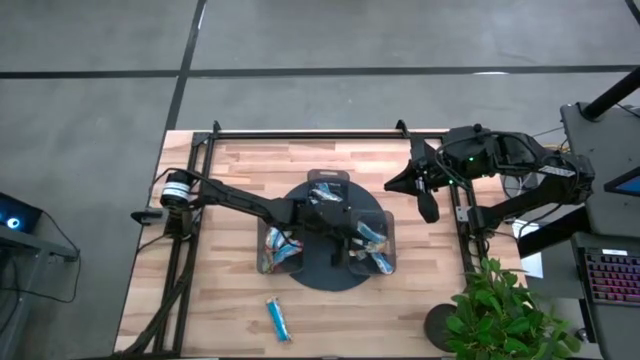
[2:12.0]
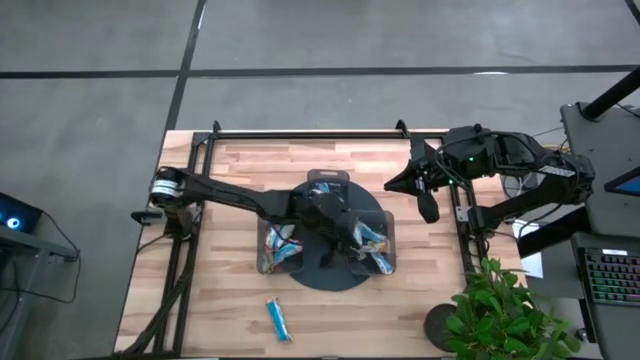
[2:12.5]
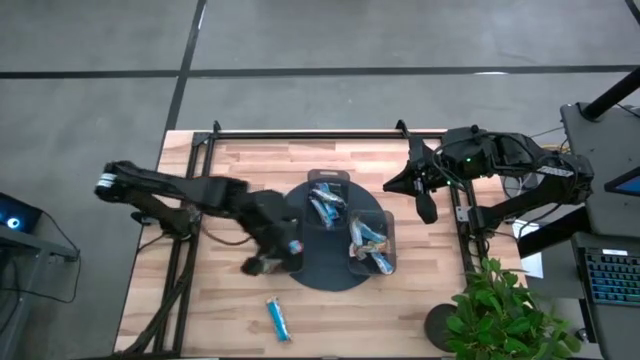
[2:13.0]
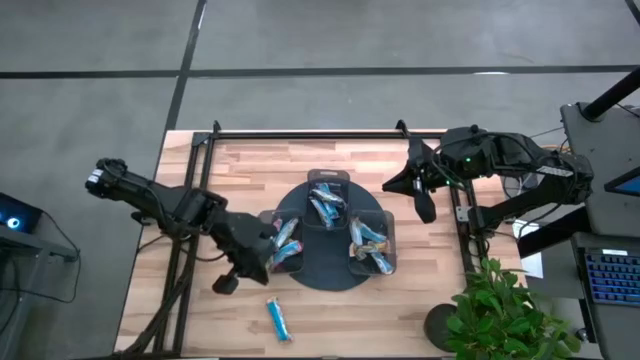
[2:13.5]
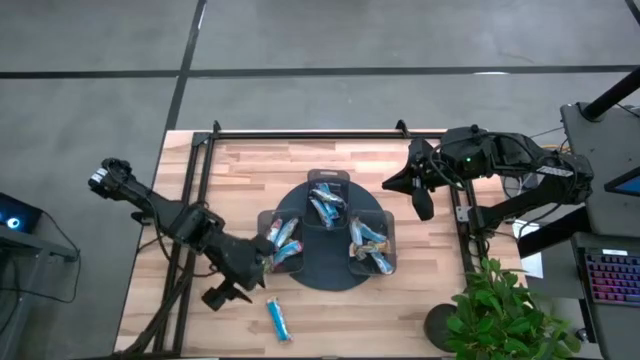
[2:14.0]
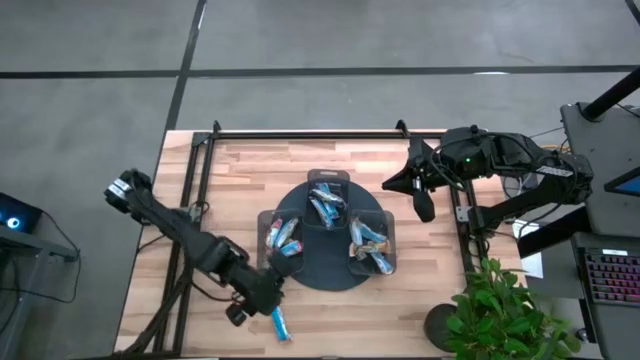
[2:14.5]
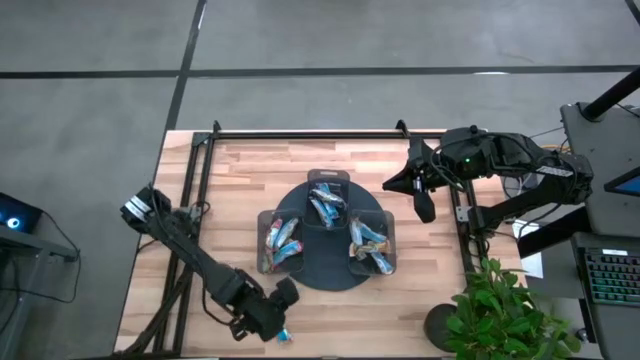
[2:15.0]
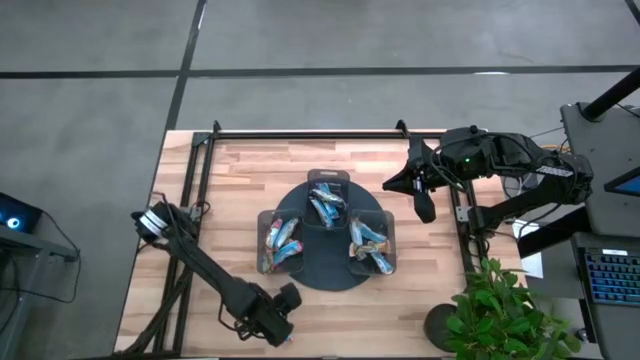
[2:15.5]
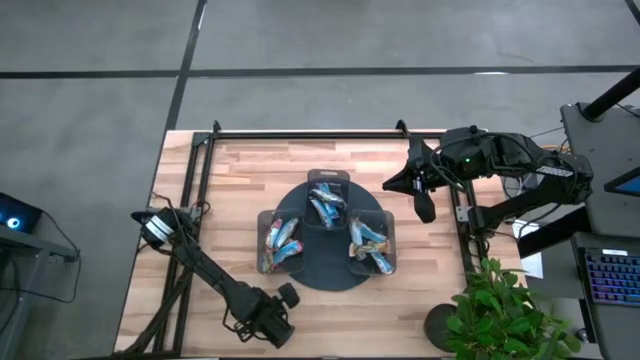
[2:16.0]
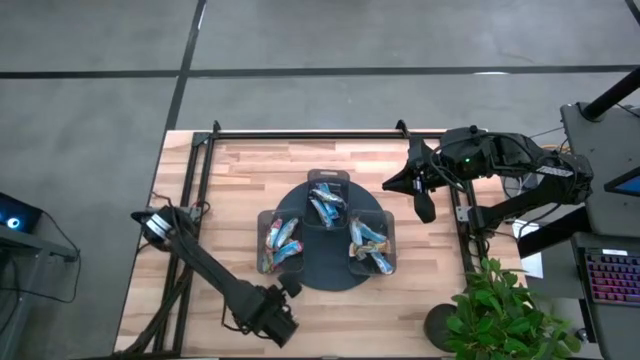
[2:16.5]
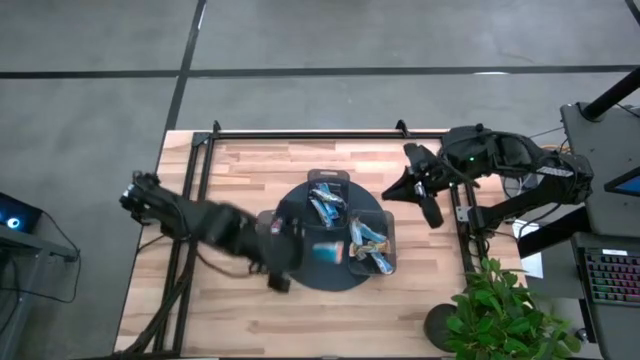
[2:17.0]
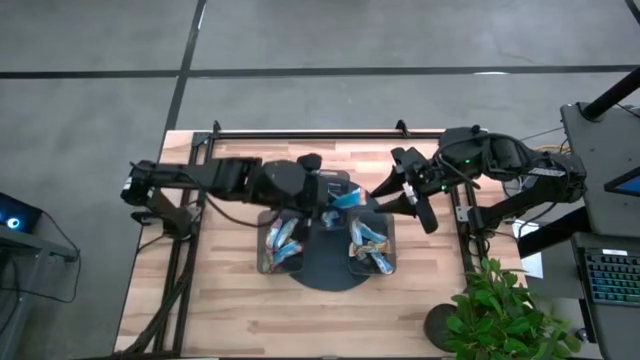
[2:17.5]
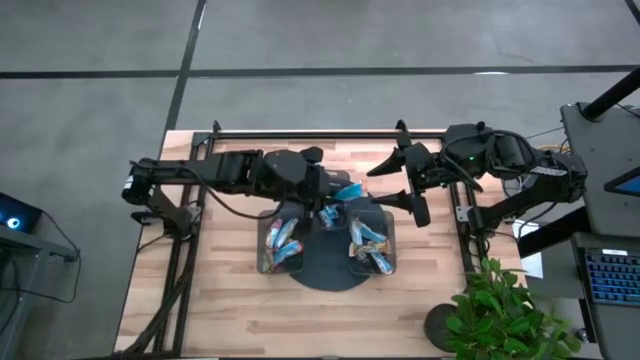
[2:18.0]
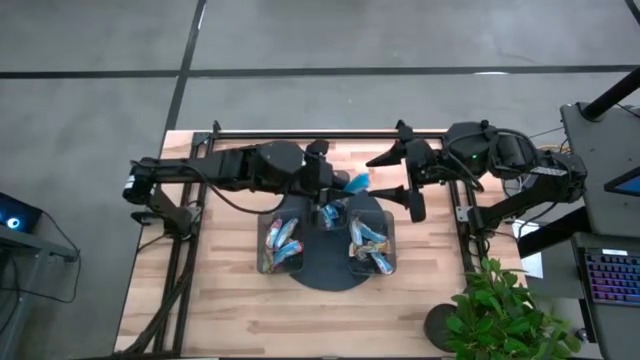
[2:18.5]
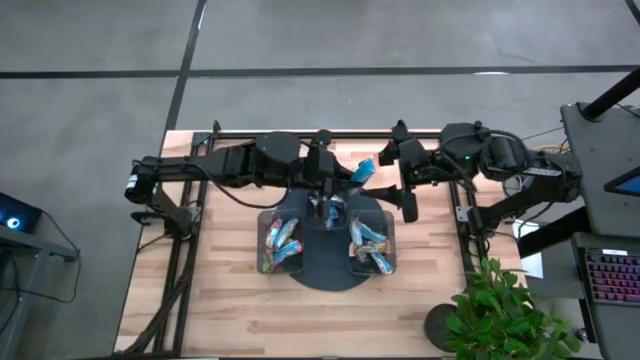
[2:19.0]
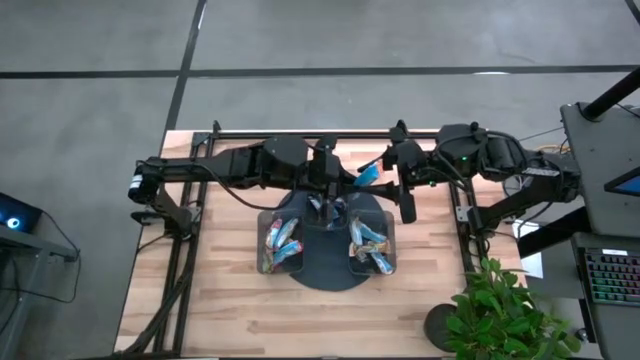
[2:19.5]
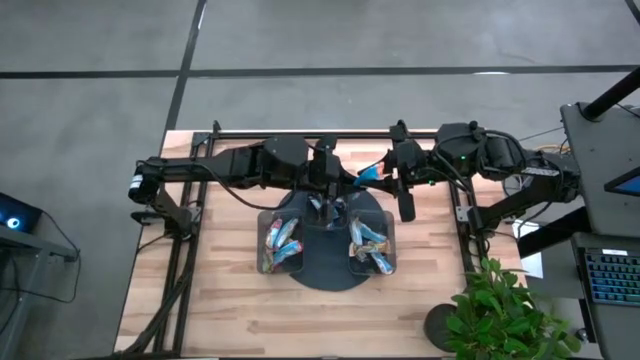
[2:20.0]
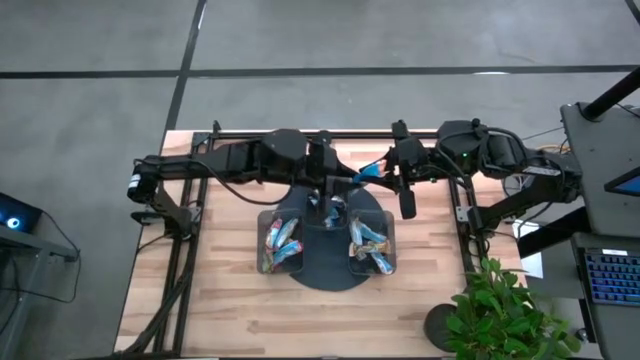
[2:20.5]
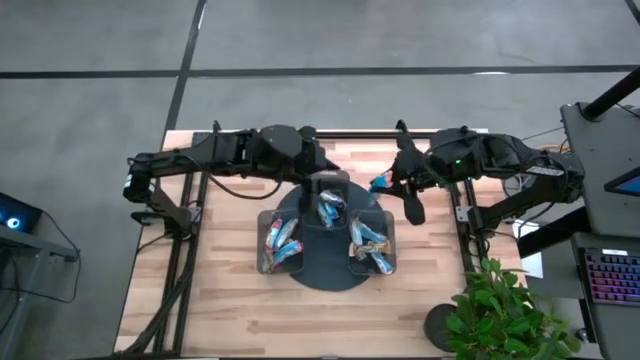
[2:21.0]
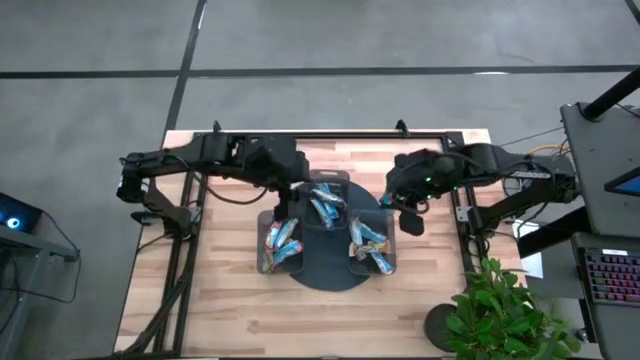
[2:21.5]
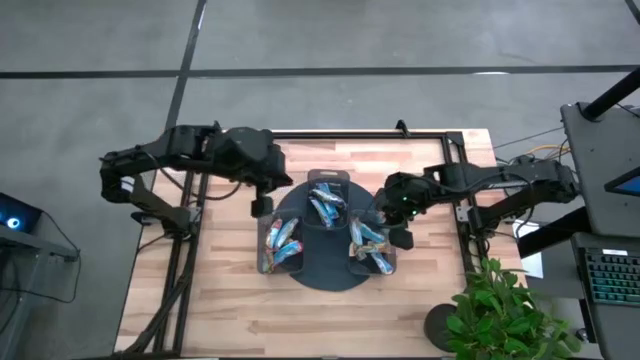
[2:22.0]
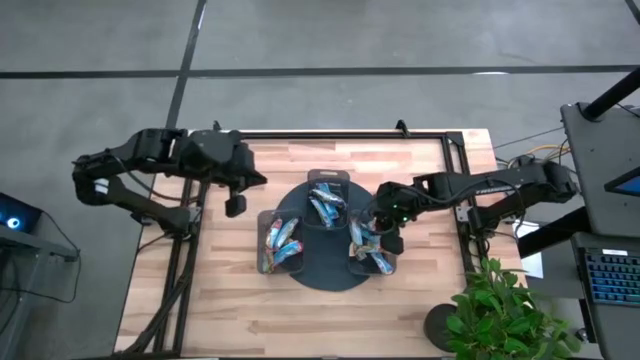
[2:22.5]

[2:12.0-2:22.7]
Task: Pick and place Granola Bars by type
Put the yellow granola bar into the bottom right black bin

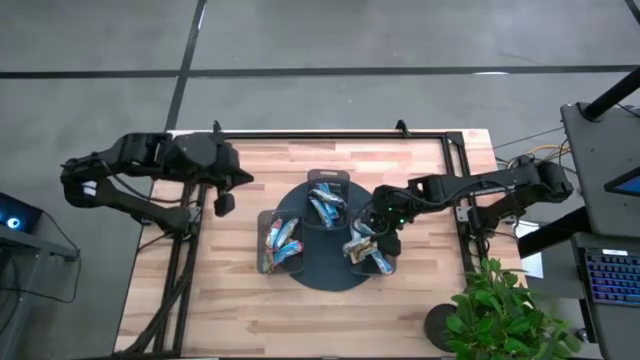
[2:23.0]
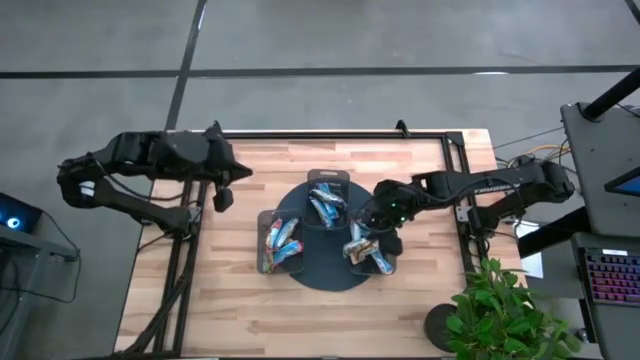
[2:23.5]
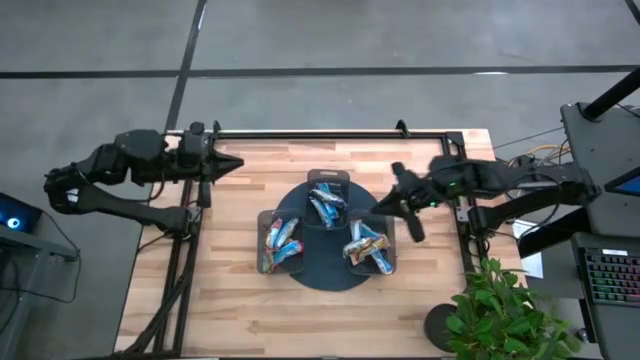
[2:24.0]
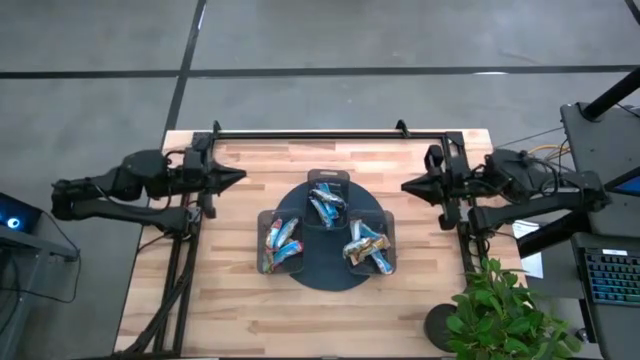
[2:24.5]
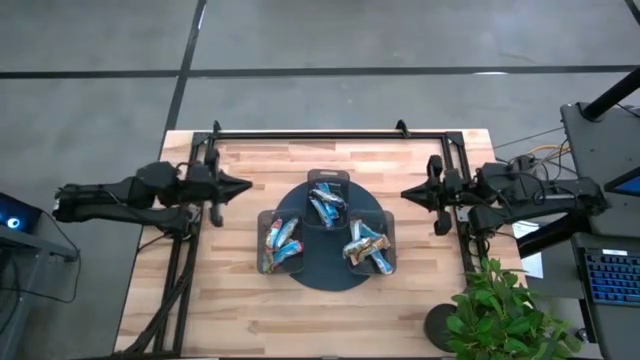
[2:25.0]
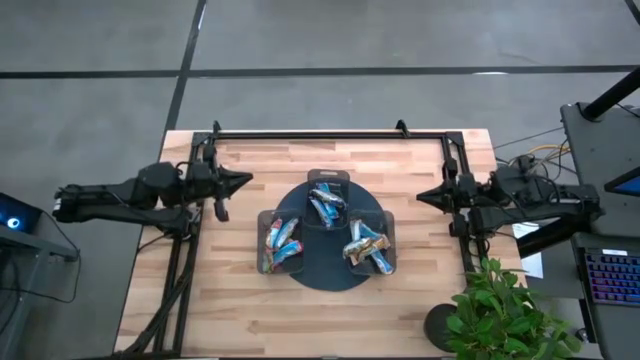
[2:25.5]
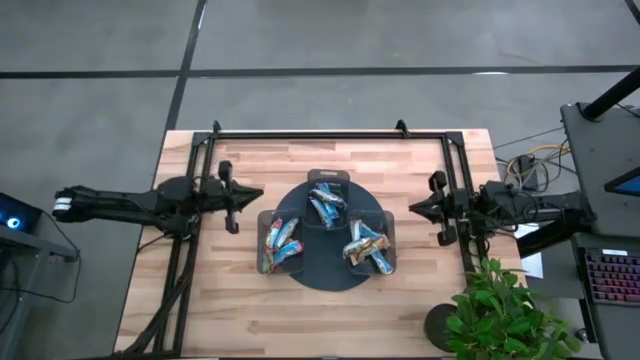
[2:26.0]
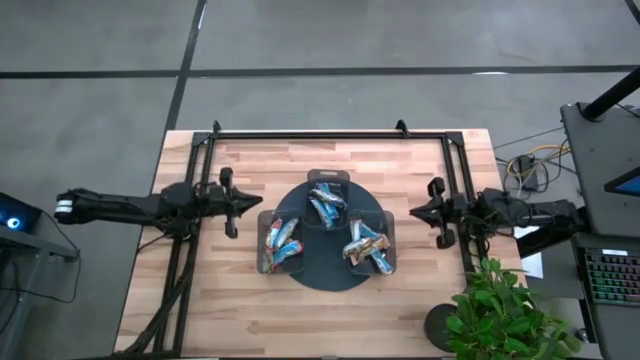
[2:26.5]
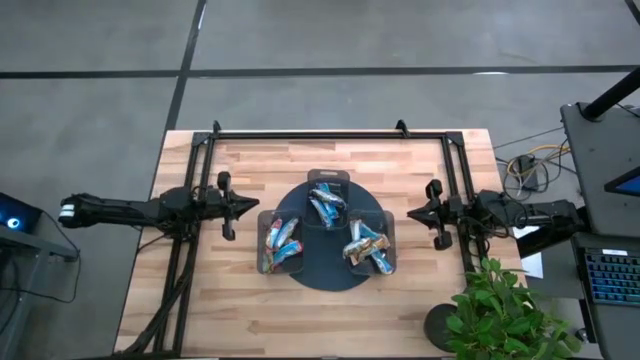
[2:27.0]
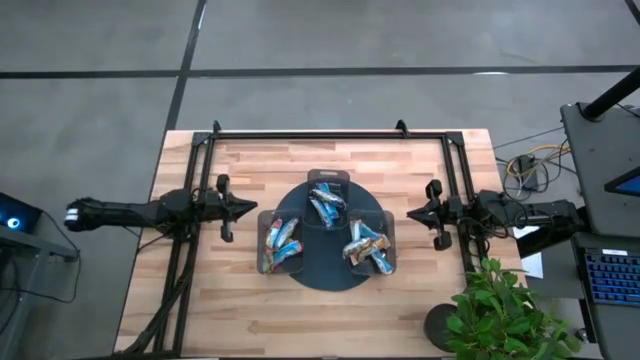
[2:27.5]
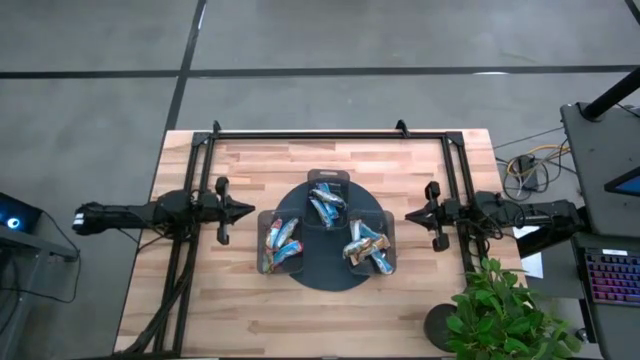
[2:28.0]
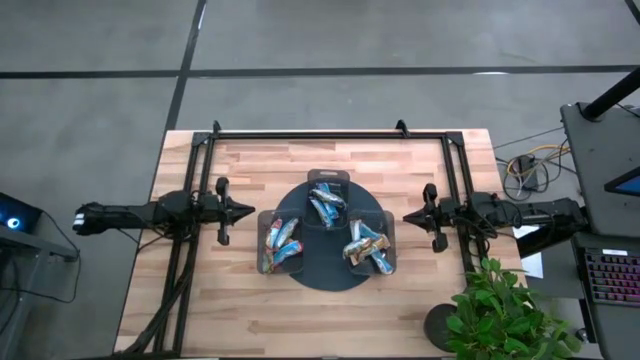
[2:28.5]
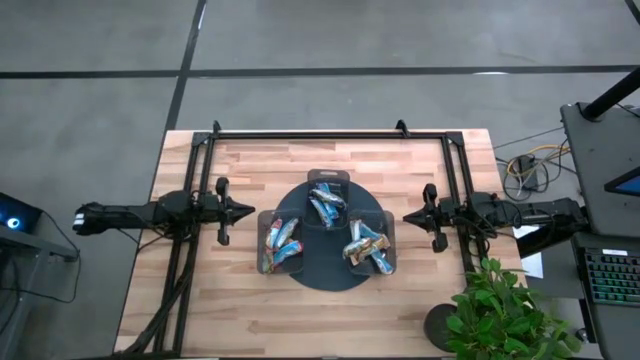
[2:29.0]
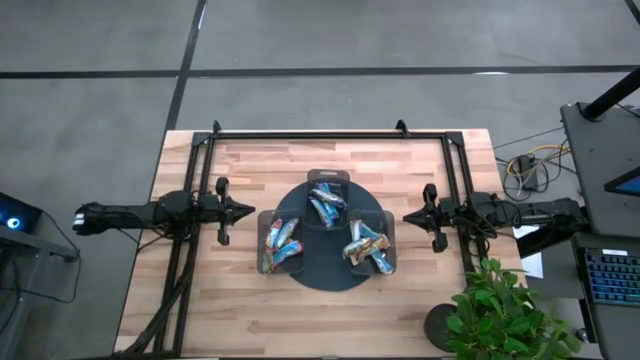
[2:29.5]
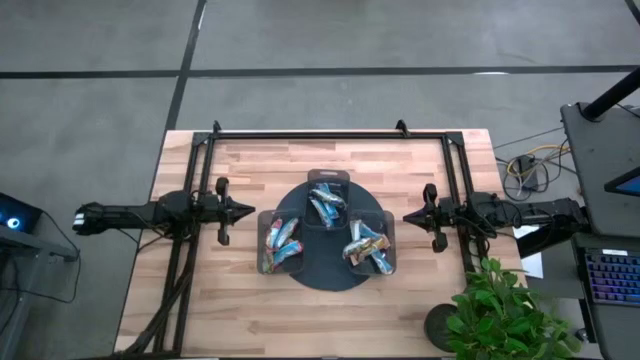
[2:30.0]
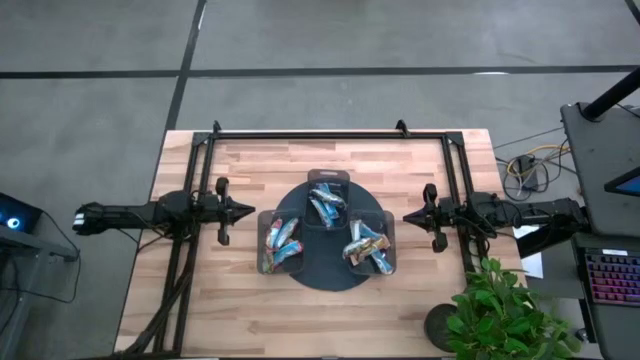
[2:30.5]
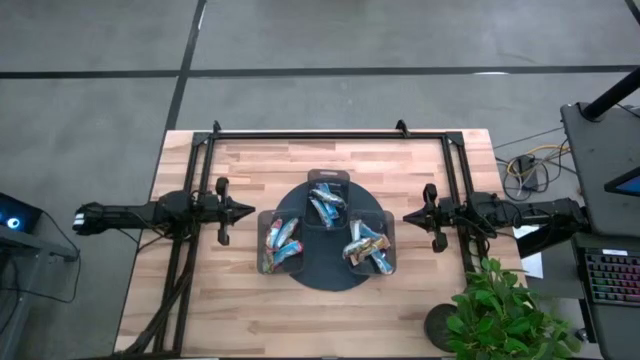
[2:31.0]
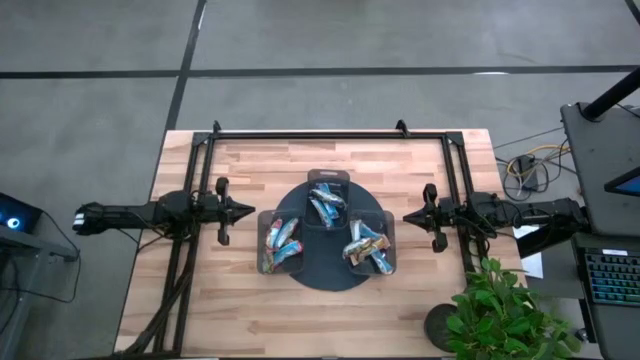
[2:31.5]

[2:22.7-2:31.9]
Return to Home Position

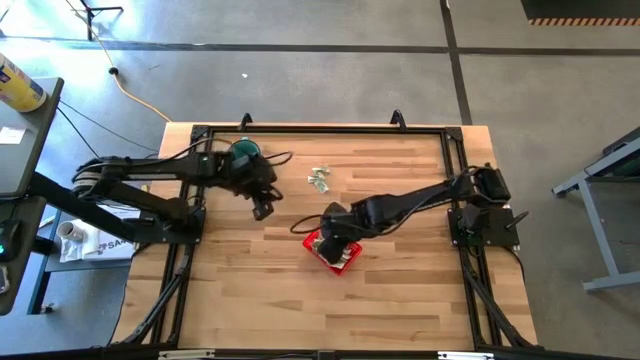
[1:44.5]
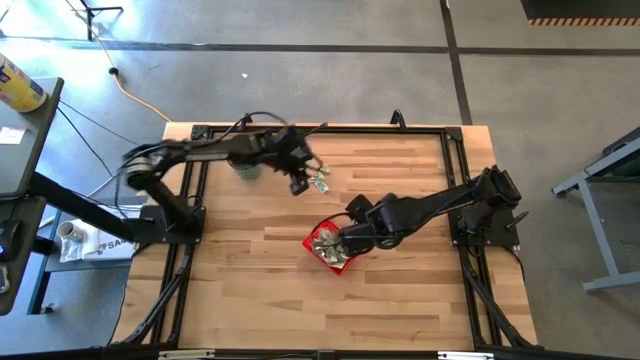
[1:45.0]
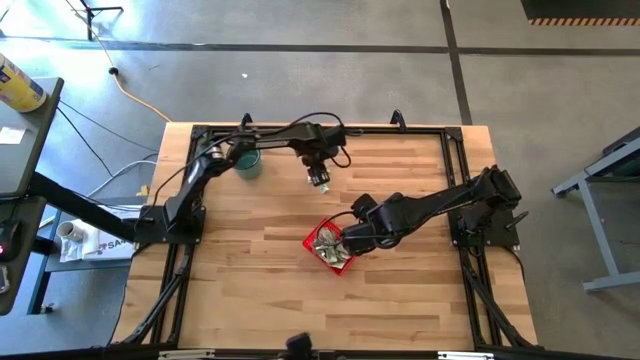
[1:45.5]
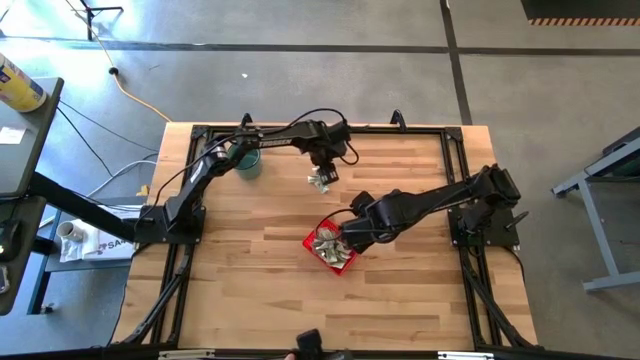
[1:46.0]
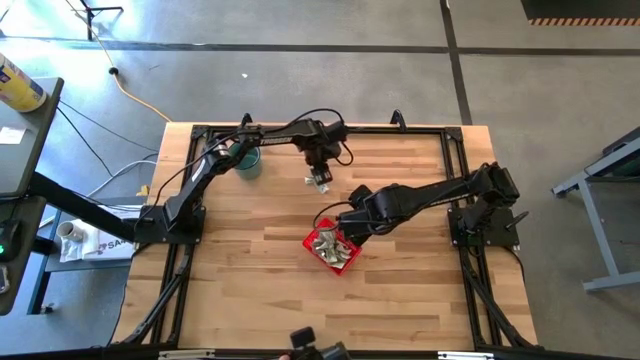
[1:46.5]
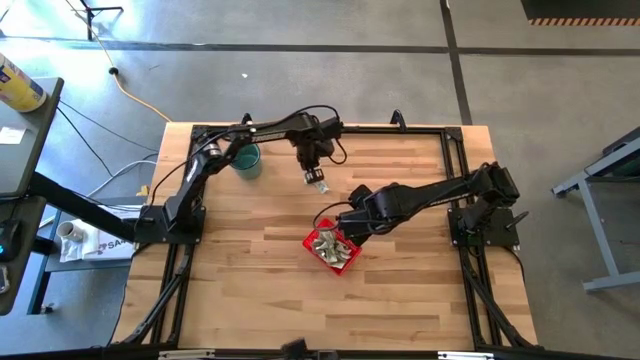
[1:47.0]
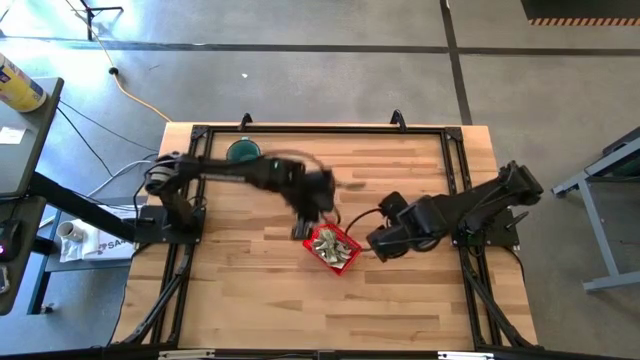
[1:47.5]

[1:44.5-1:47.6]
Task: Pick and place Stevia / Truvia into bins
Put the top light green stevia packet into the bin
